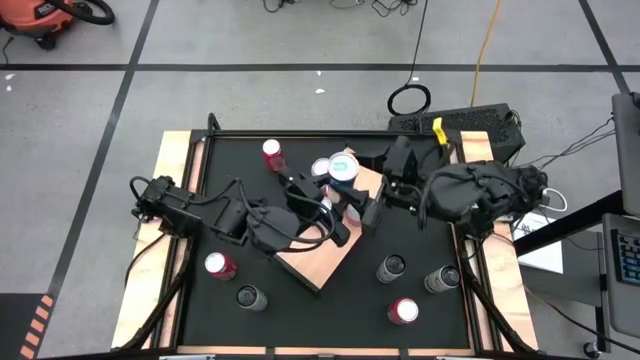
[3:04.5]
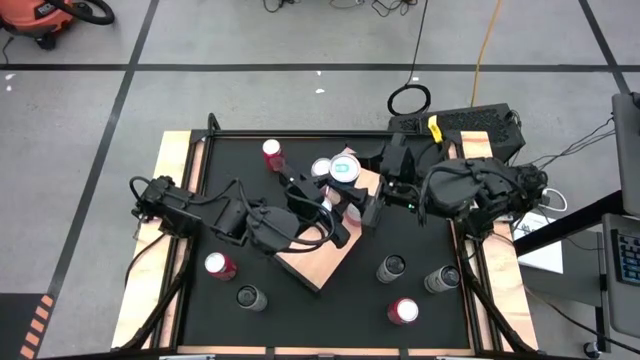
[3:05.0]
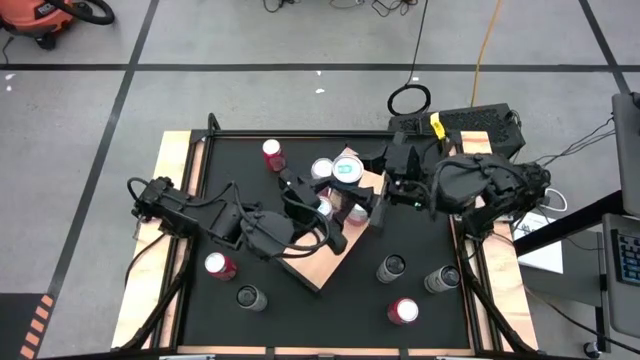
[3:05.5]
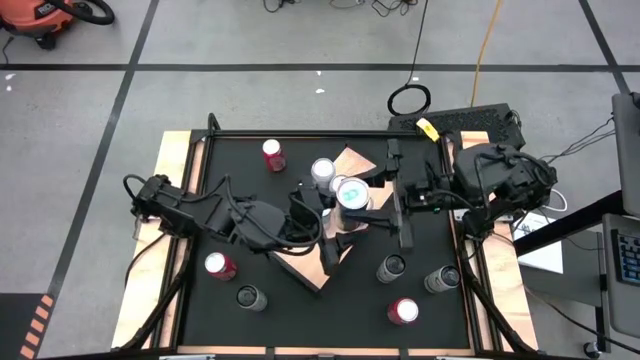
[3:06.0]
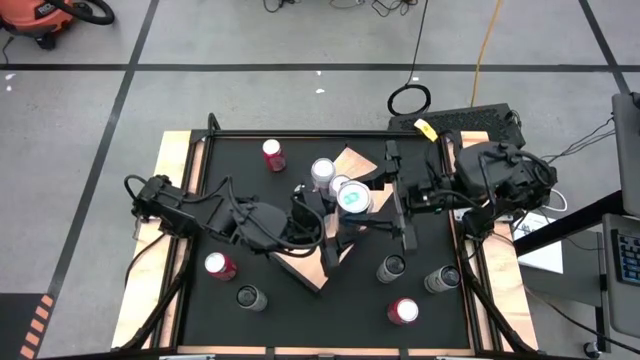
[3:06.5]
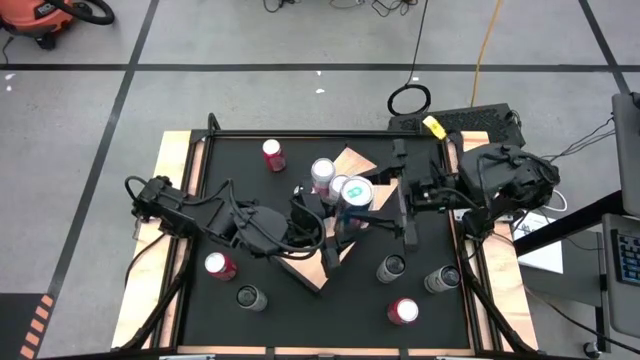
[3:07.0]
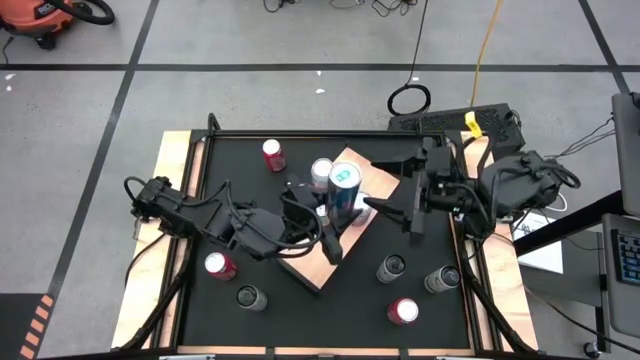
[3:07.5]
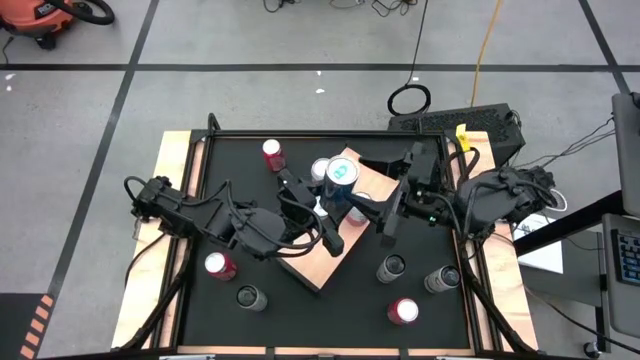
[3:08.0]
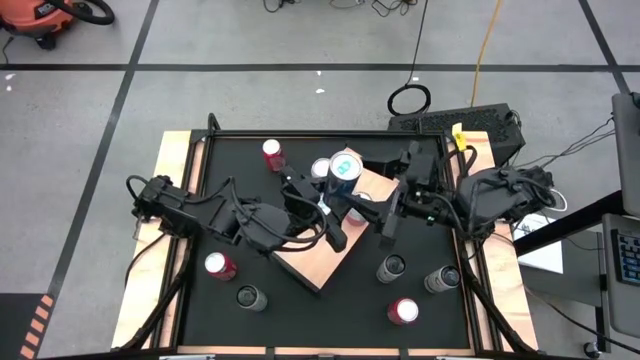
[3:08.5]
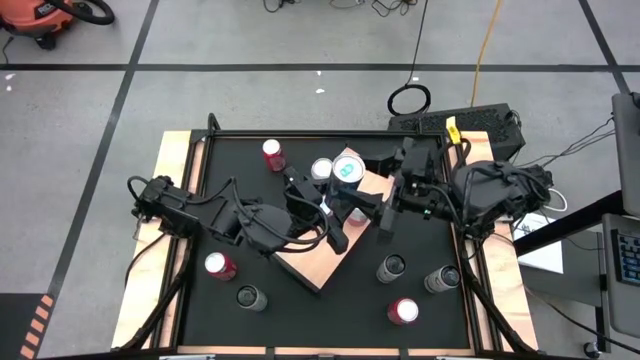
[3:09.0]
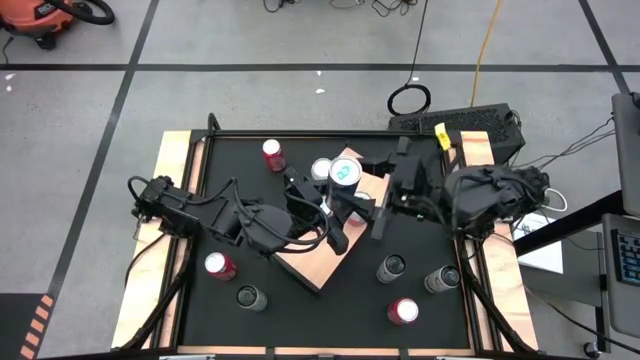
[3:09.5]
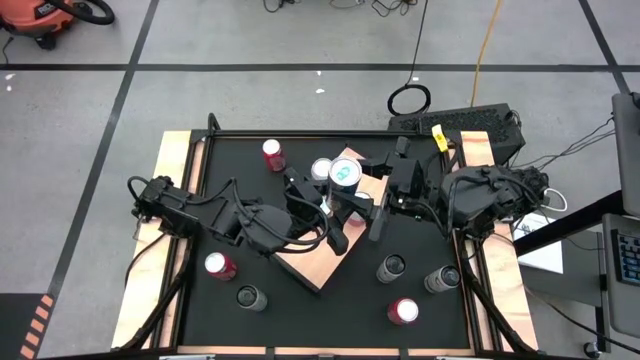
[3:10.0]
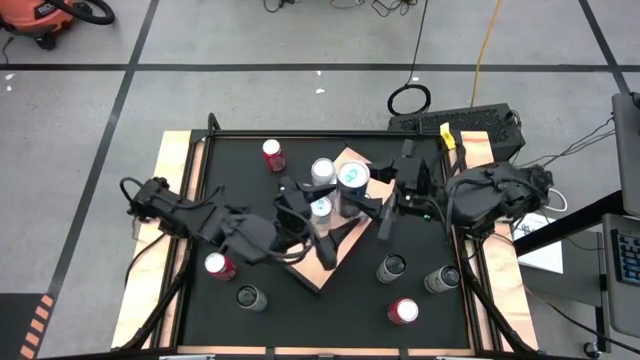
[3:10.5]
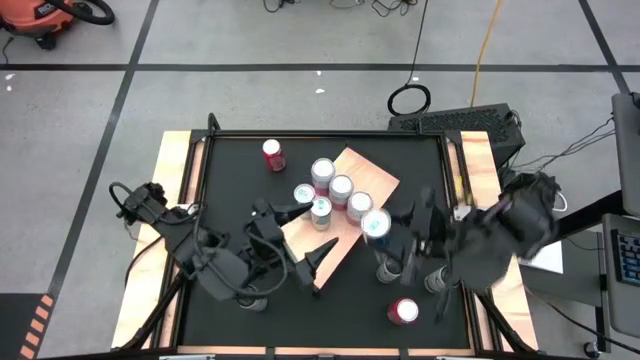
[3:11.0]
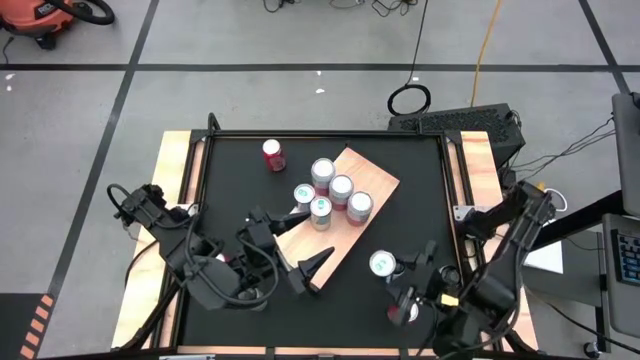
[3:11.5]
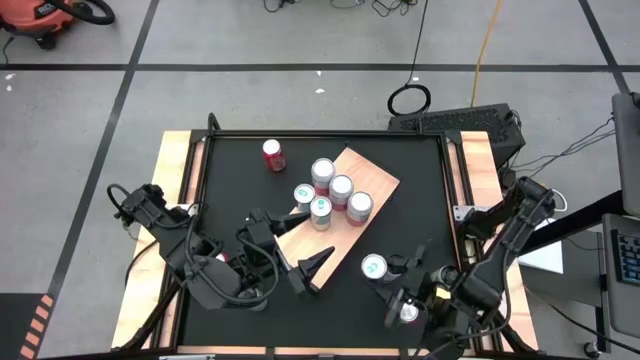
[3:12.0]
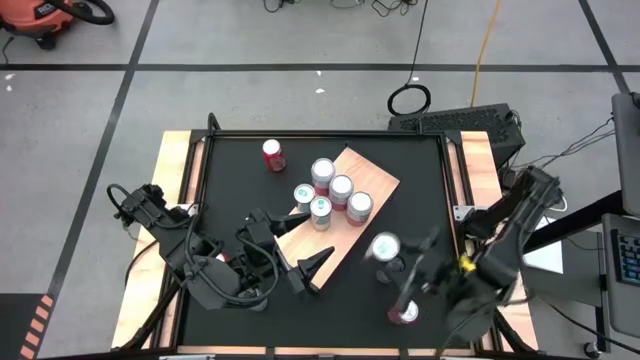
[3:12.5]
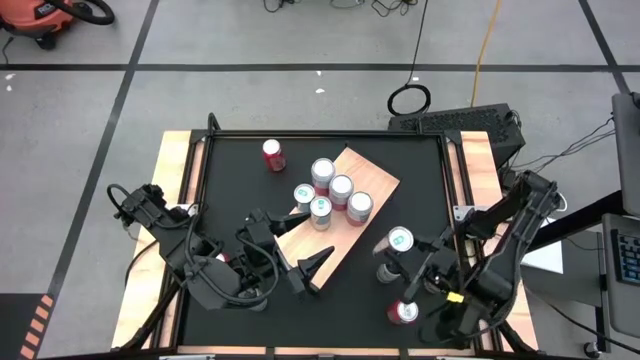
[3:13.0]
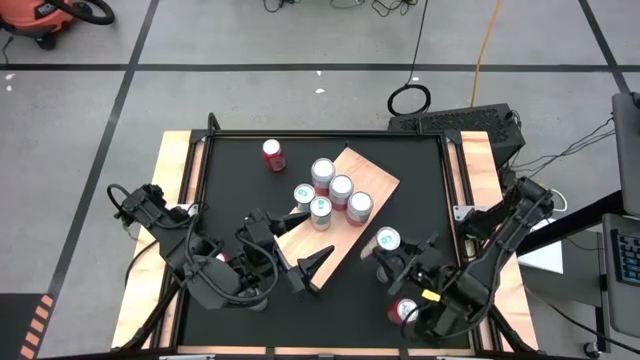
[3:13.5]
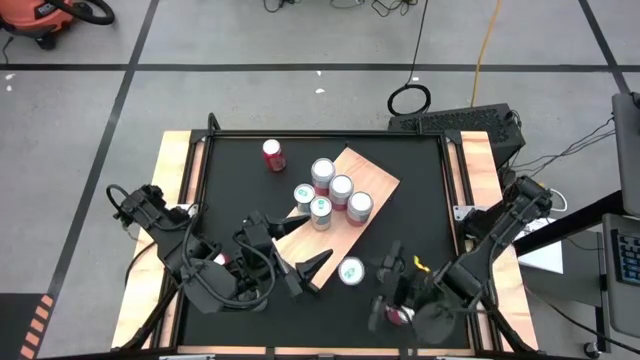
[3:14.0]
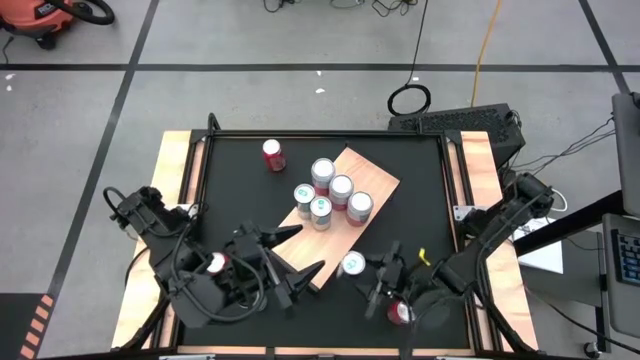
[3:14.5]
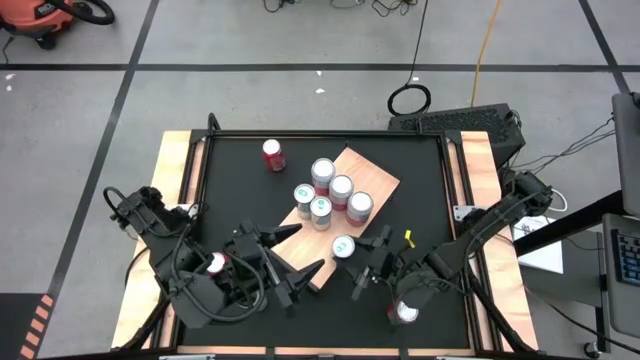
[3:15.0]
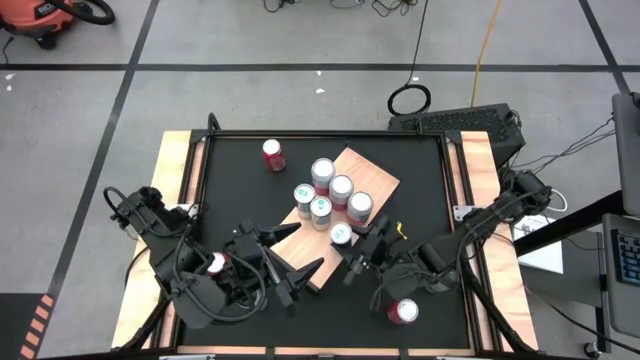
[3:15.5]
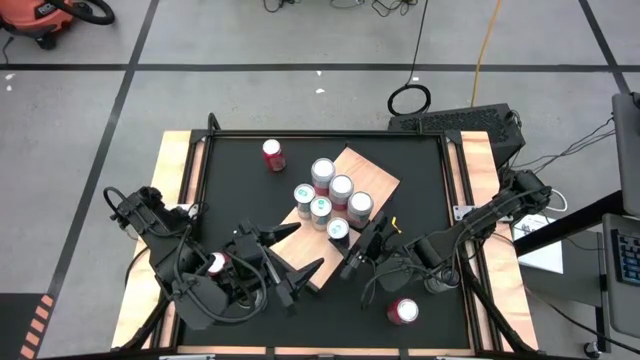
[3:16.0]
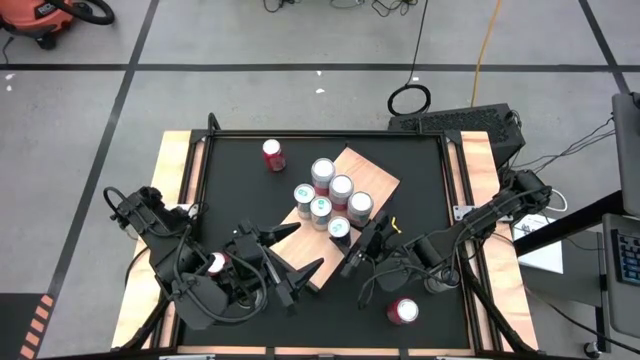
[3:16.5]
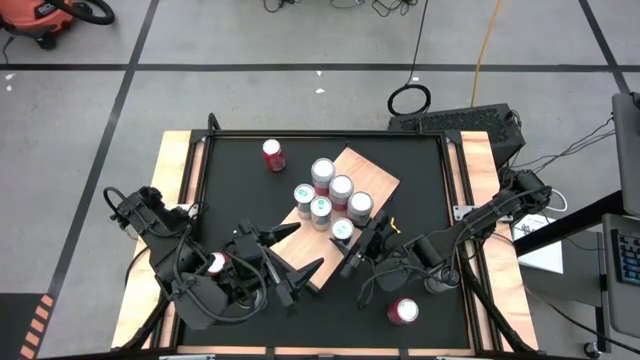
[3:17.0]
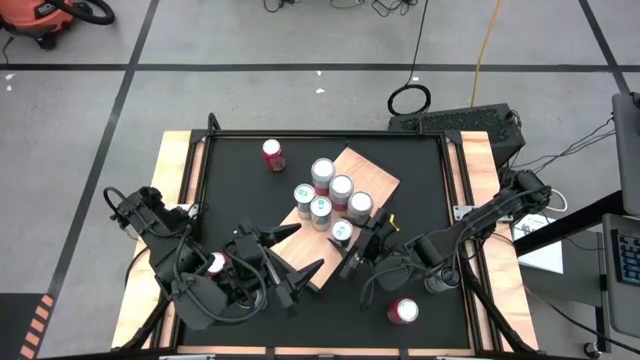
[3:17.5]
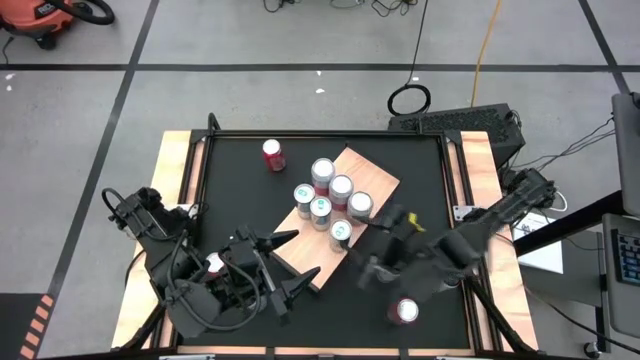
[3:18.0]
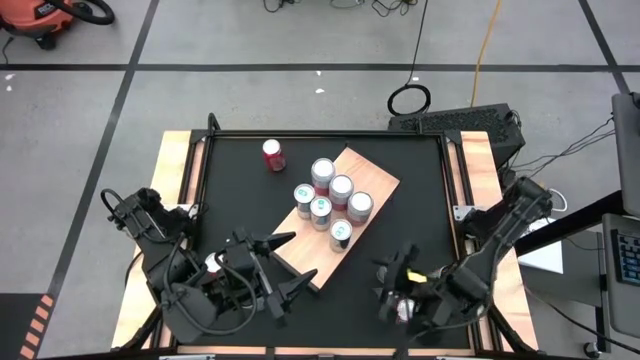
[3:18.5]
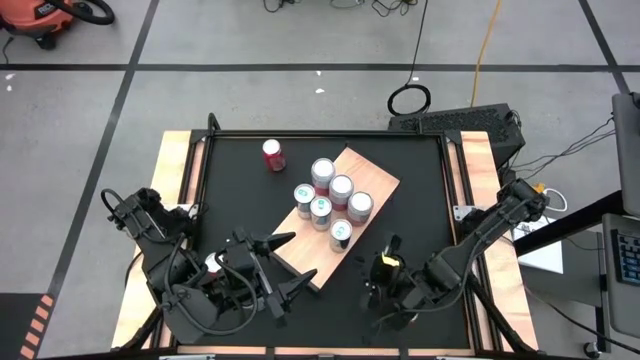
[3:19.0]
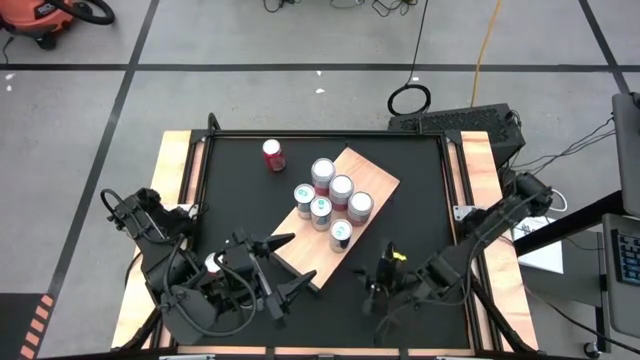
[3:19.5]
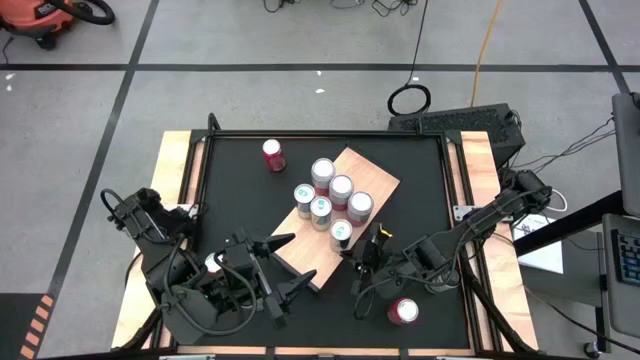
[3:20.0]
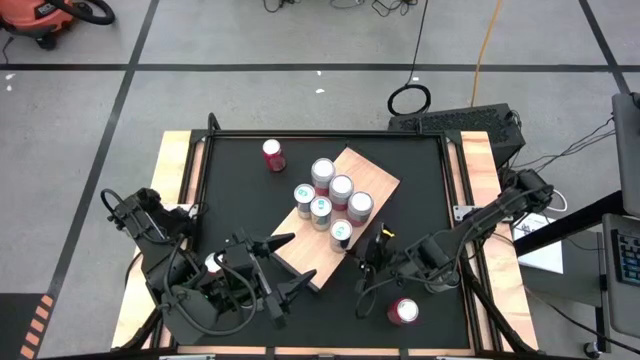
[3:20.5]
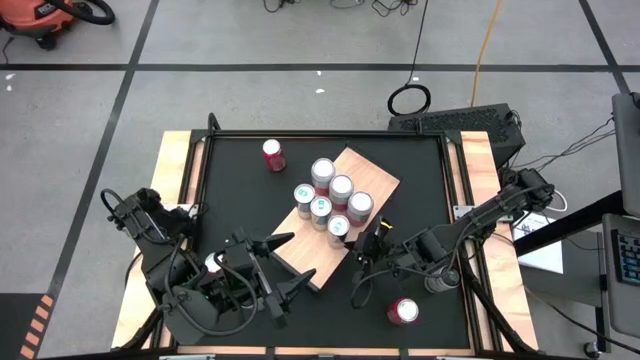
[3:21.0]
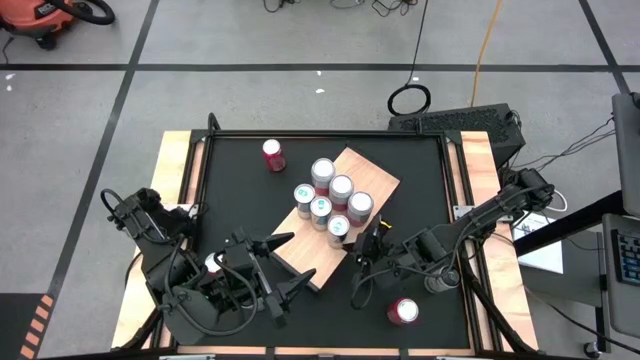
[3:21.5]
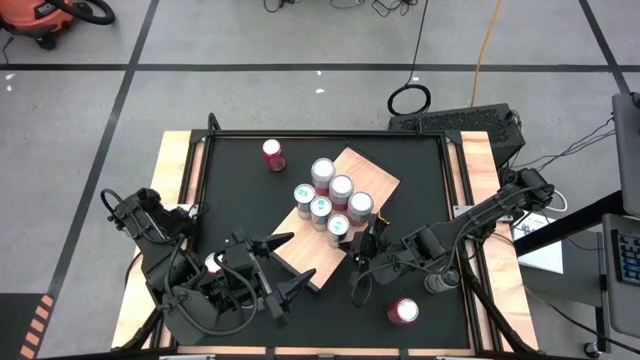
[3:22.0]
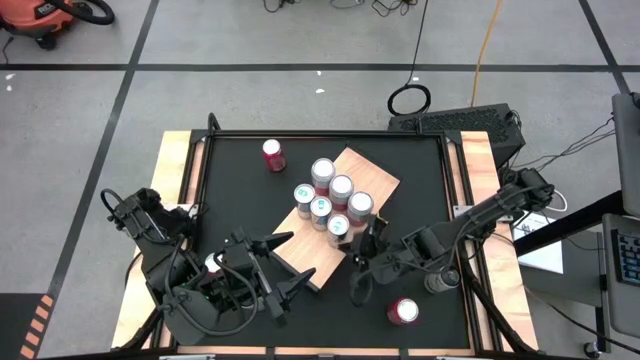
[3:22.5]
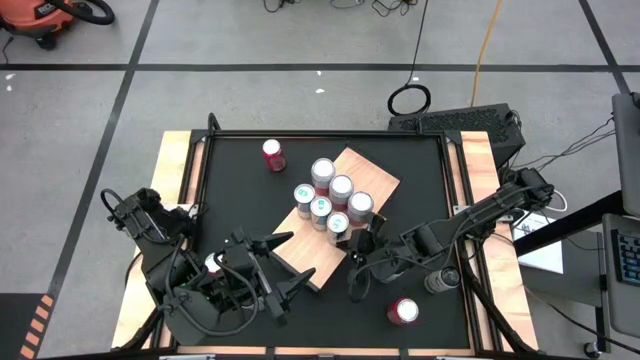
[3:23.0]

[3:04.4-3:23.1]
Task: Place canned beverage on shelf
Put the blue soda can on the shelf aligned with the blue soda can

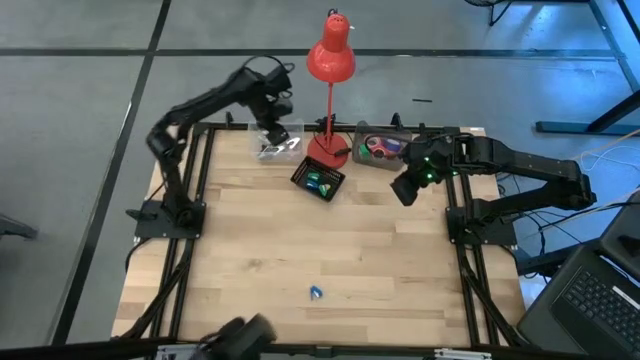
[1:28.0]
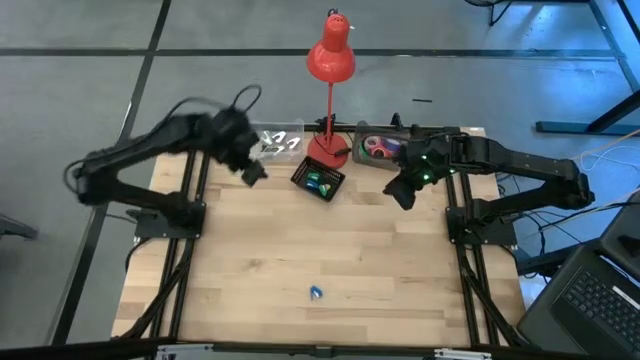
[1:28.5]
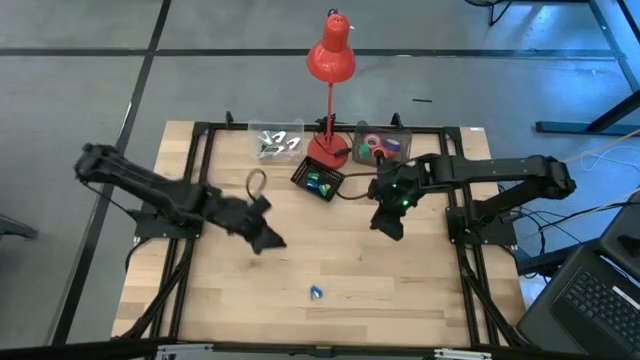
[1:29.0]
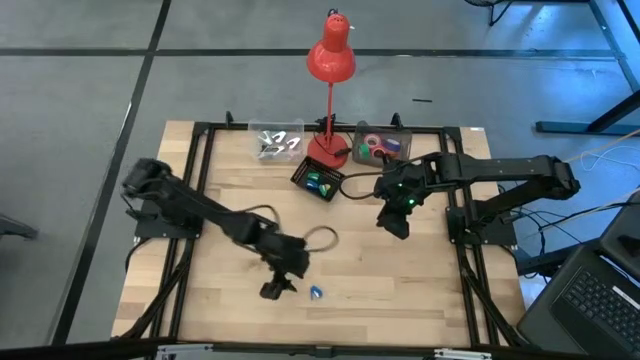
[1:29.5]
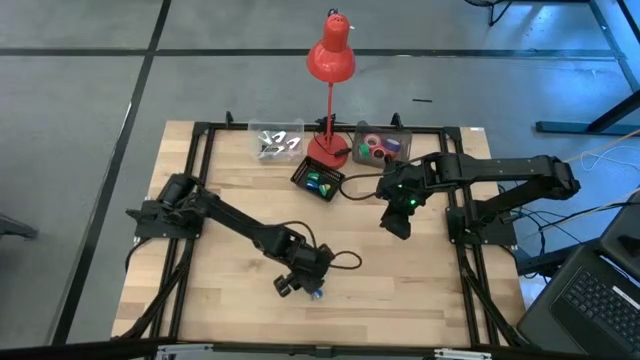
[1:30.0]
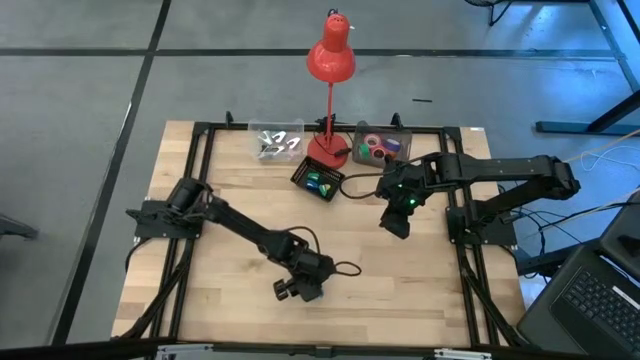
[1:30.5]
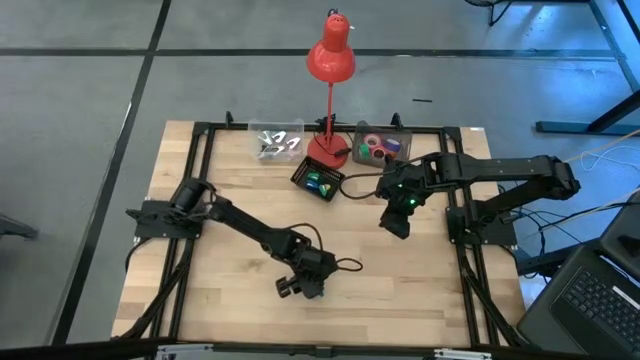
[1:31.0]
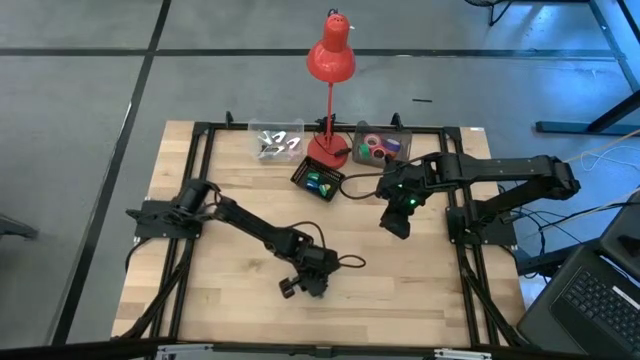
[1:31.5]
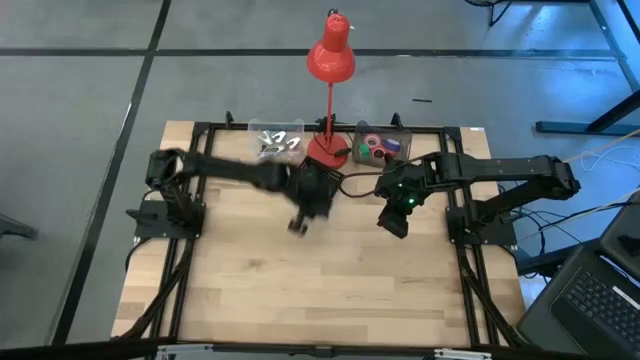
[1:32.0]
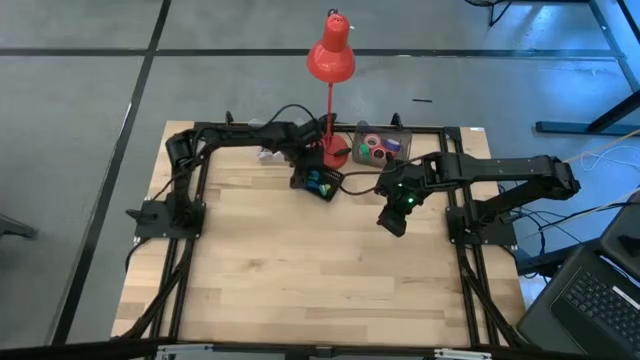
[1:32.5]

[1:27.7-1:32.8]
Task: Pick and place Stapler, Stapler remover, tape
Put the blue stapler into the black bin
